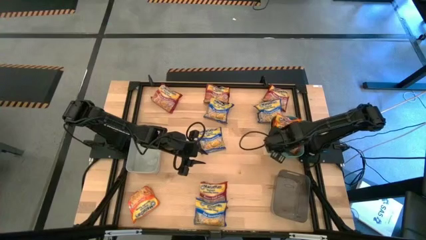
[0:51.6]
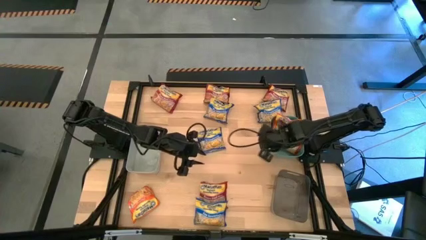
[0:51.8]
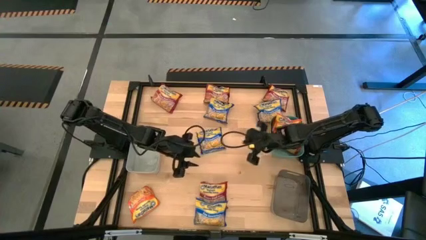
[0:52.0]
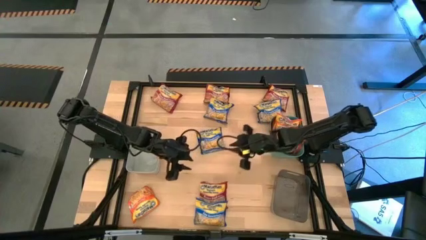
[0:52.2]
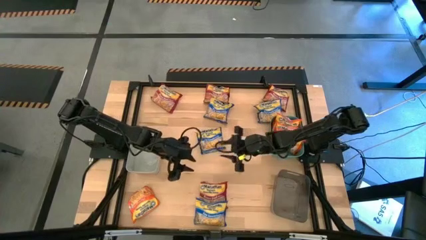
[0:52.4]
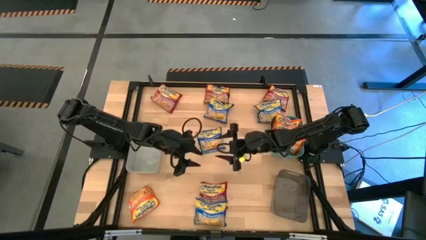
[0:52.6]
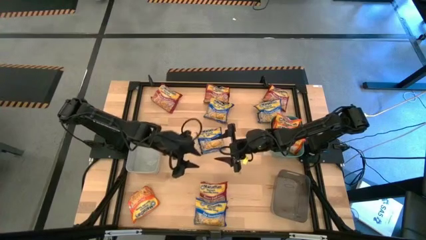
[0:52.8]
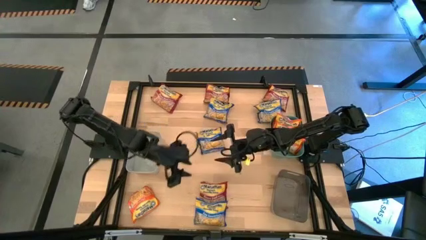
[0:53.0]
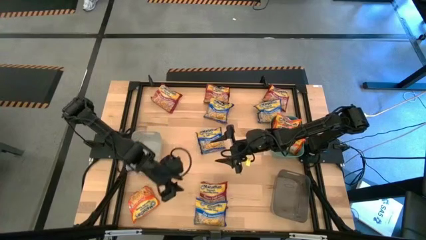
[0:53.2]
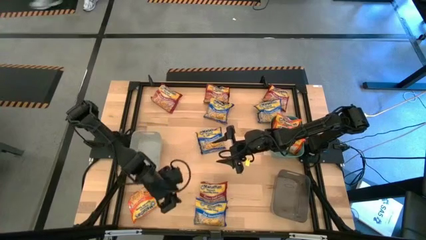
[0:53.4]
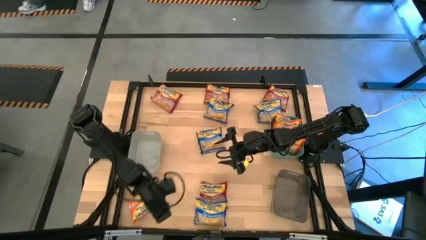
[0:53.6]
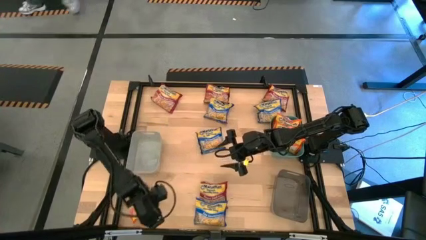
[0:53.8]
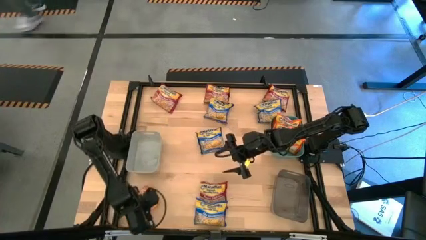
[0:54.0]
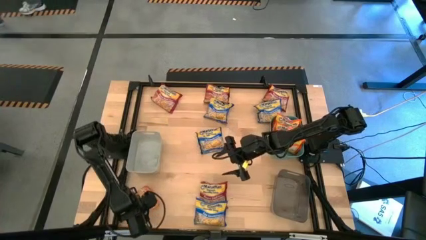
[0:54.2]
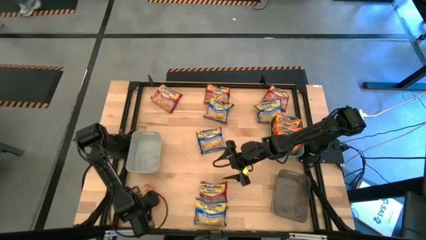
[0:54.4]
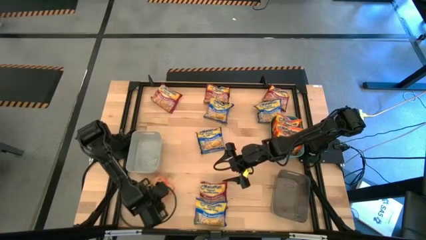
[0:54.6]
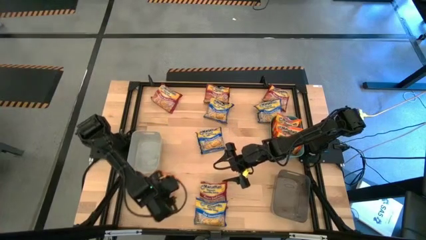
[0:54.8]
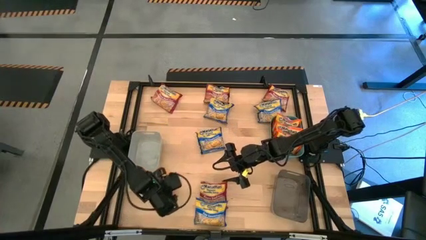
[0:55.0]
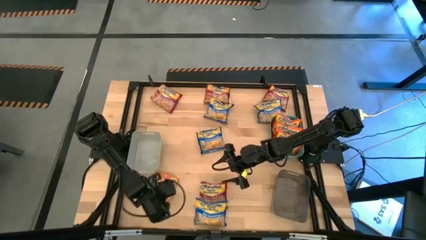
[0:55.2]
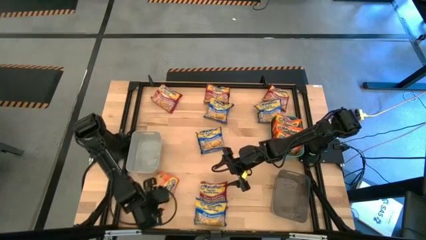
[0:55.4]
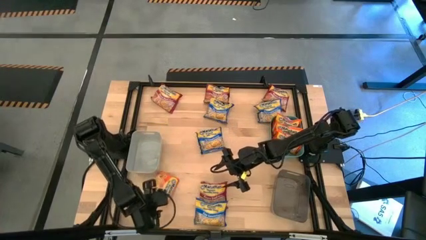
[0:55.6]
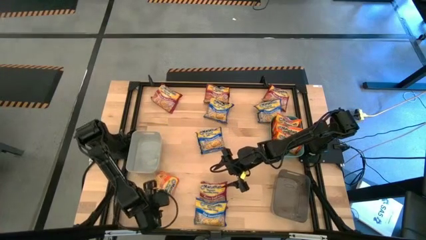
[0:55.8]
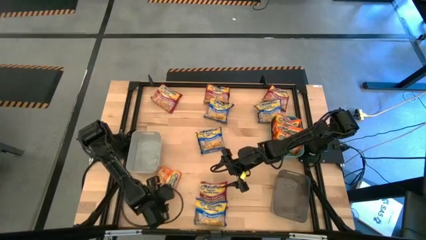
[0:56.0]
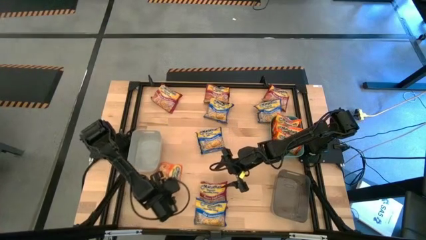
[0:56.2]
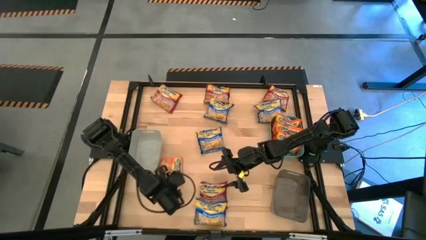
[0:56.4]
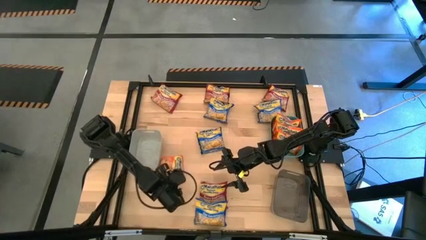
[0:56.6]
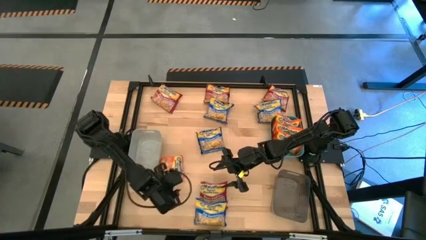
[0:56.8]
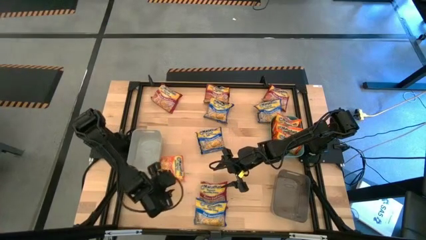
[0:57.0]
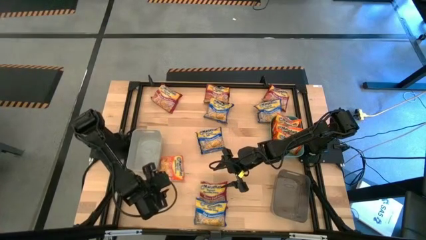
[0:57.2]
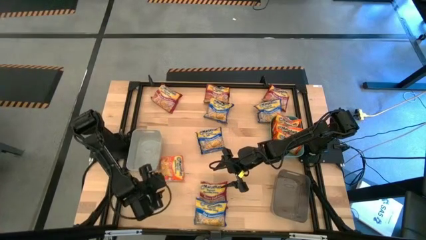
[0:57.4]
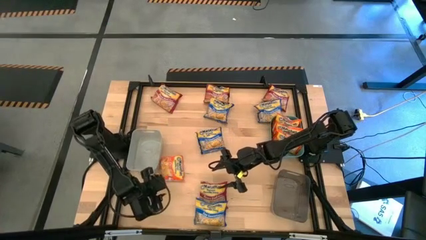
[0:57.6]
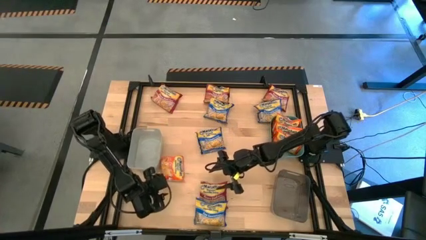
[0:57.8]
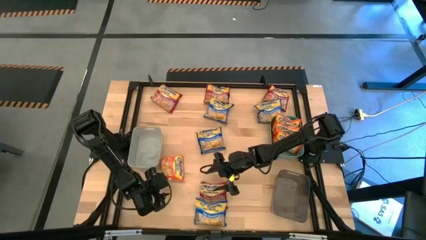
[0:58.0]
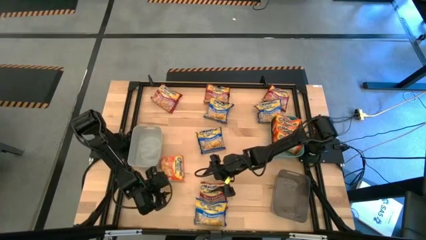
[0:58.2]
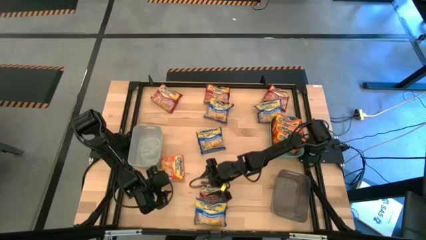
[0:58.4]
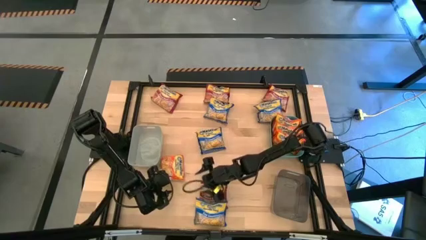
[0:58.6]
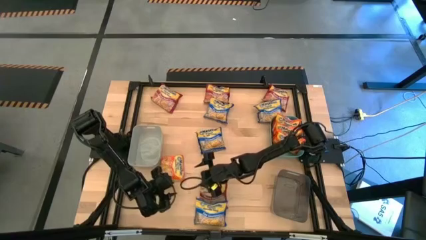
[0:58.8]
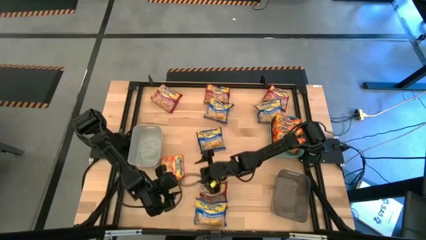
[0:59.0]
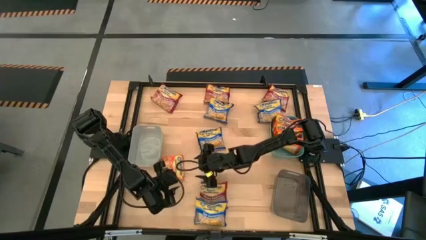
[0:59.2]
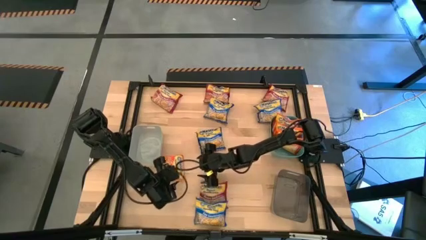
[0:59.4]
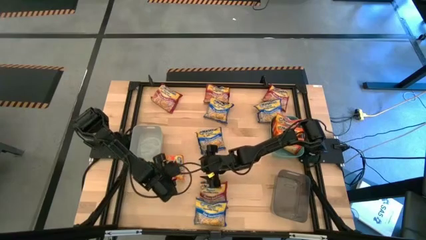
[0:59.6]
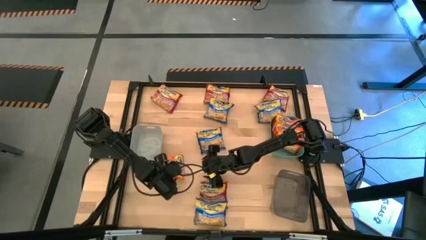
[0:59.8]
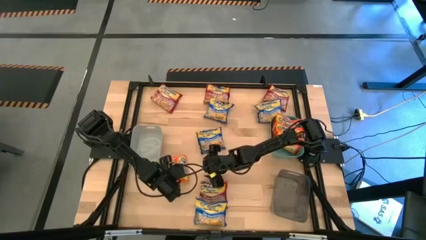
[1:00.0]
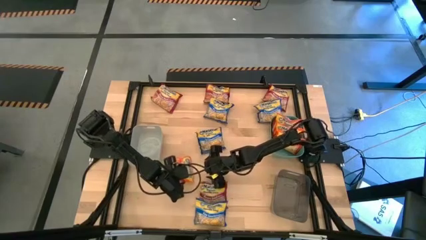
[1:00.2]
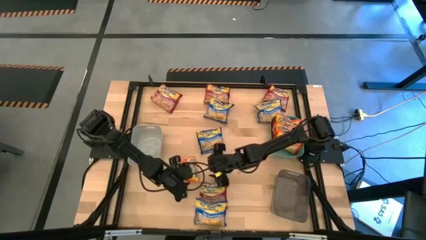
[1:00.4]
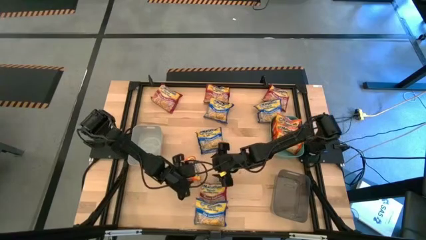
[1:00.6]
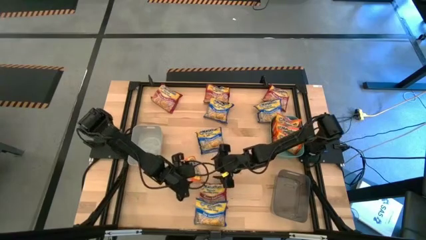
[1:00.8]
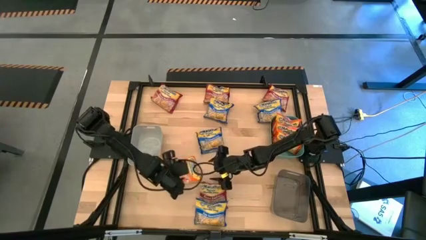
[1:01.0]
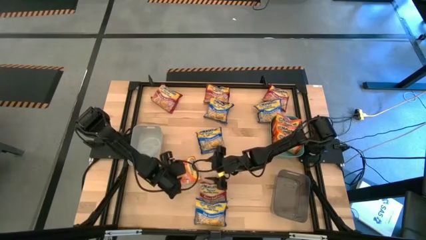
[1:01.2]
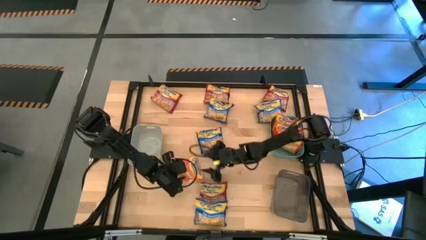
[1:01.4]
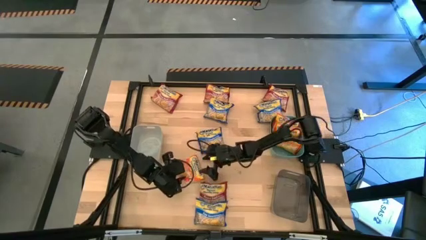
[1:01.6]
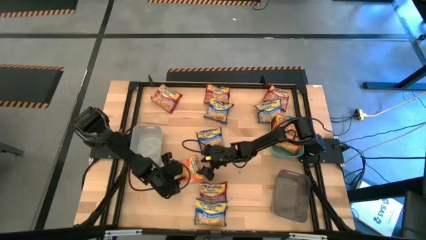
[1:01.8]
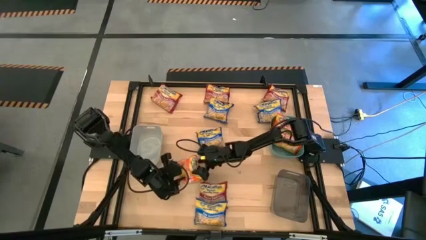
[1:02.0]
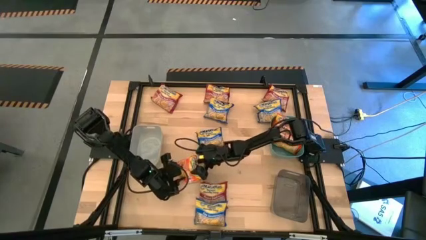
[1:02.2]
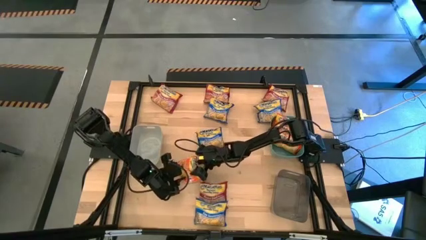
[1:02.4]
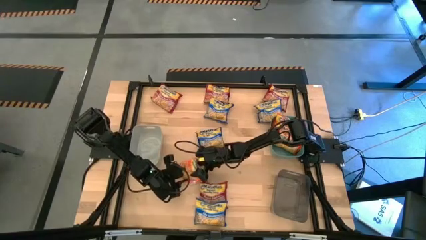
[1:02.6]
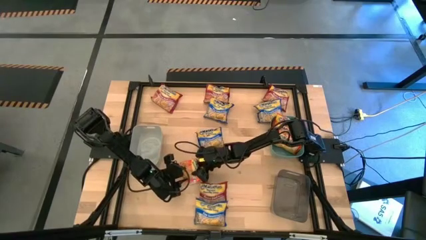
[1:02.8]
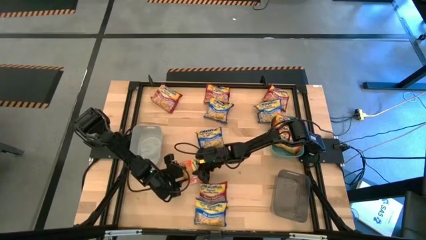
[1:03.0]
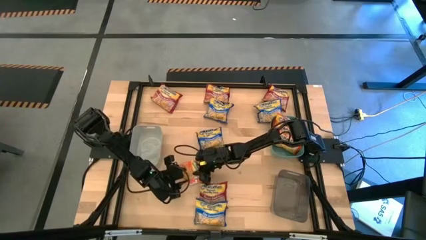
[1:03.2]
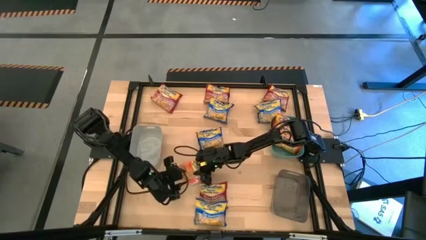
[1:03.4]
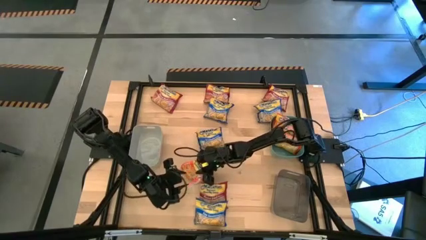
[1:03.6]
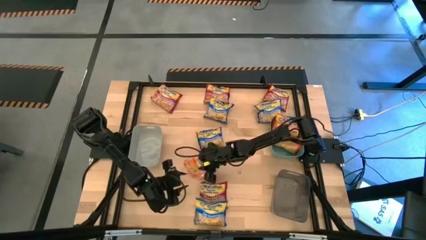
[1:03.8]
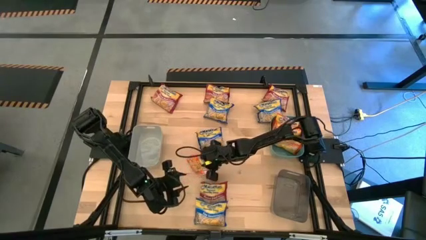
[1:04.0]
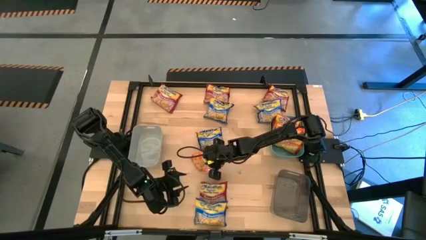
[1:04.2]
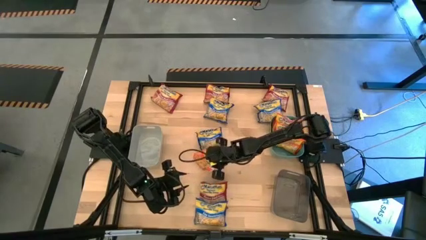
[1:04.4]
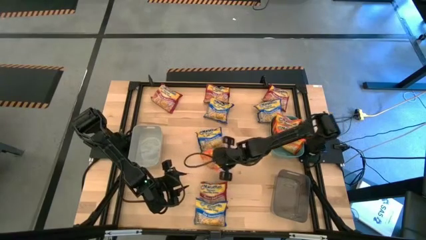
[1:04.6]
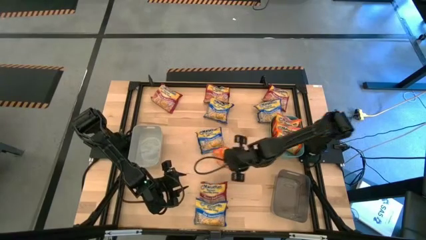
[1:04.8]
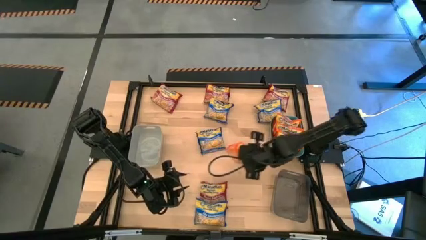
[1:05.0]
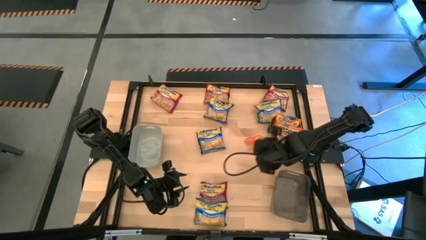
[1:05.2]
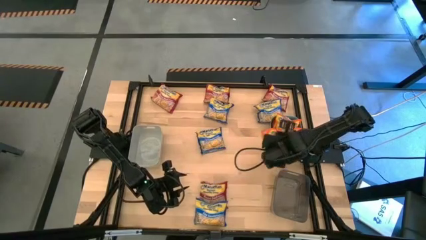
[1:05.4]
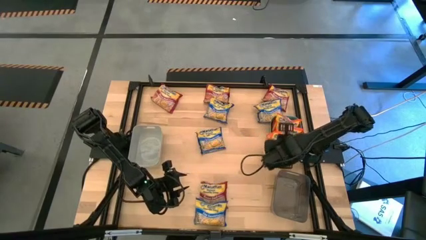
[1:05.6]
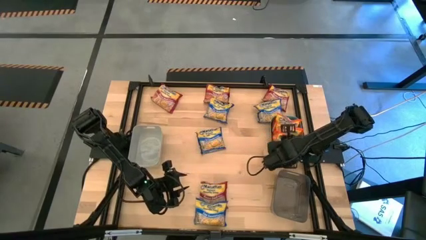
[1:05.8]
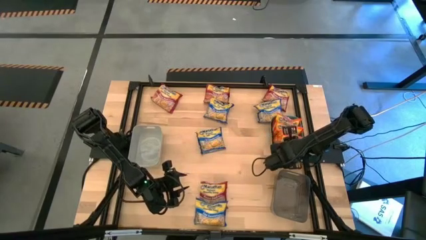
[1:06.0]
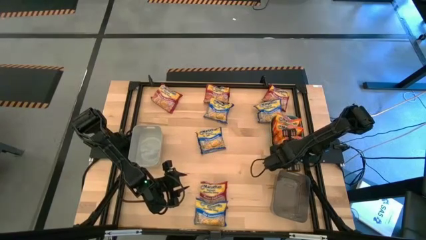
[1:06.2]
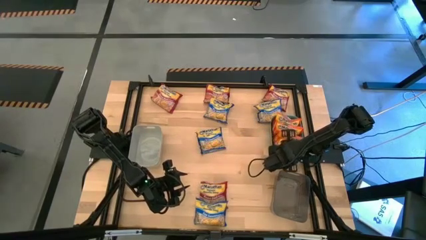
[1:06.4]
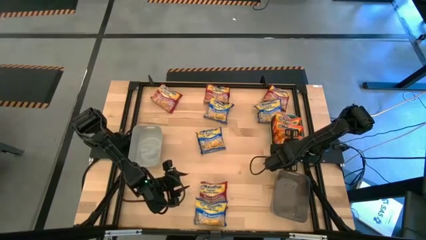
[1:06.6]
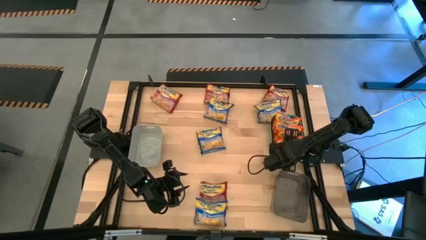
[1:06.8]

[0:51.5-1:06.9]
Task: Sort Maruchan noodles
Put the orange pack noodle into the green bin

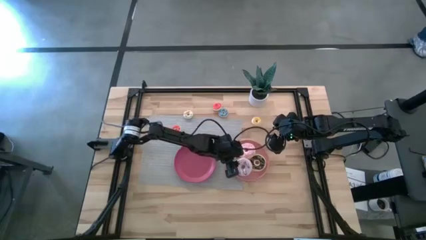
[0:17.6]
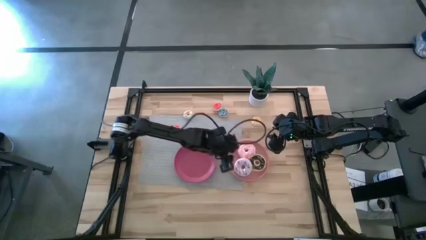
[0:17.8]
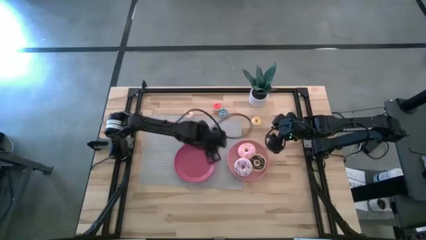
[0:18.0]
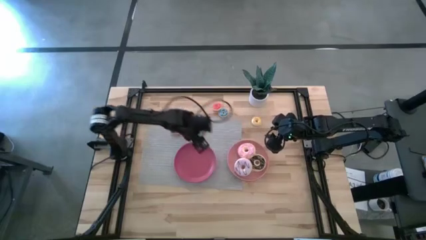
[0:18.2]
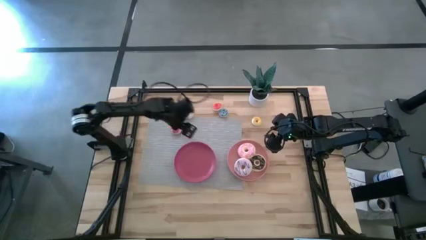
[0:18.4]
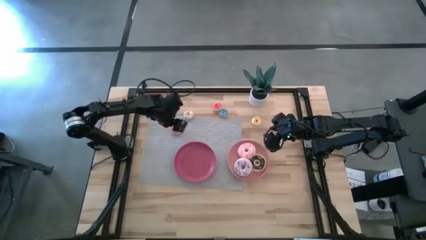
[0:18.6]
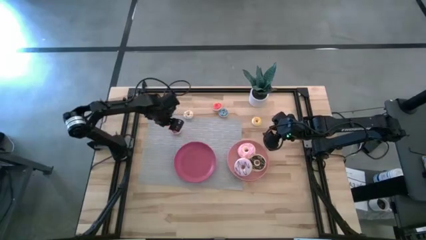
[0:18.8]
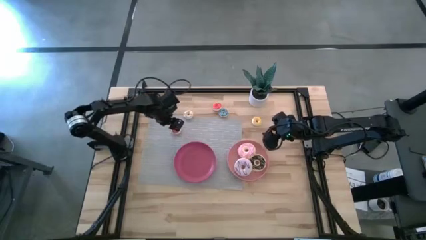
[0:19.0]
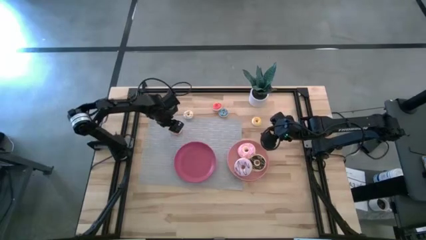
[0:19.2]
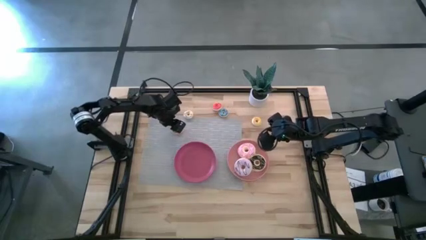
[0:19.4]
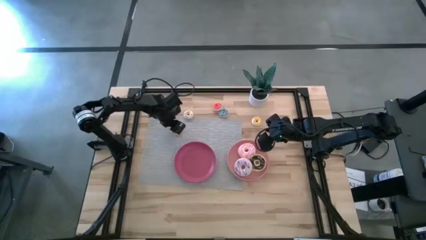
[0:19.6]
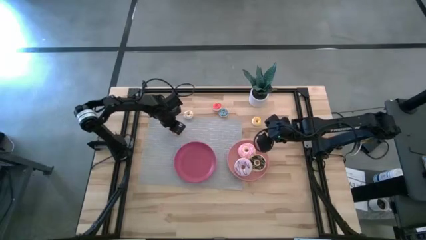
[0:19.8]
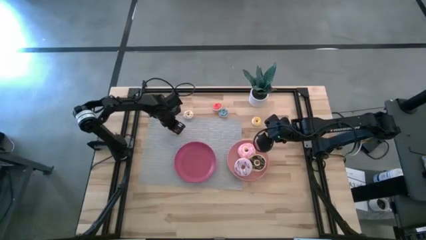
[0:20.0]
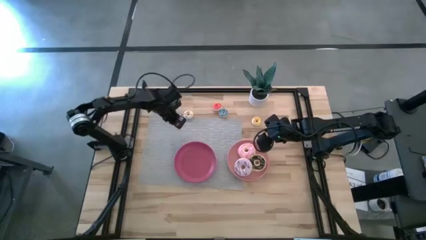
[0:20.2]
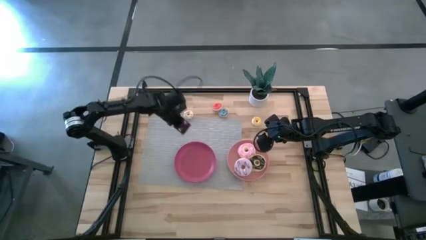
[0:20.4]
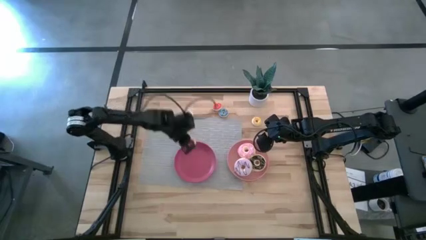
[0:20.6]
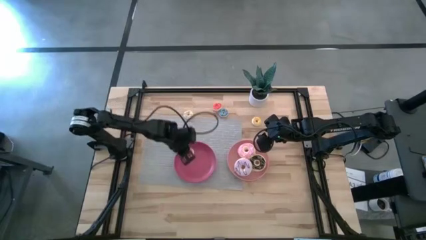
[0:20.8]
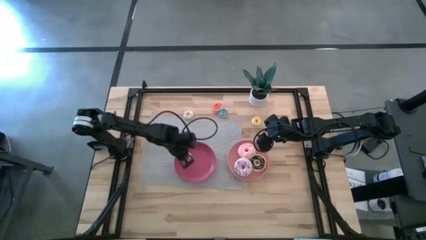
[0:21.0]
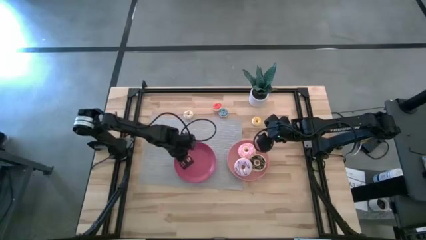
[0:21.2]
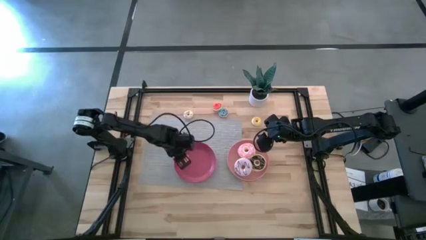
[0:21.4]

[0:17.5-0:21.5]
Task: Pick & Place donuts
Put the small orange donut on the pink plate
